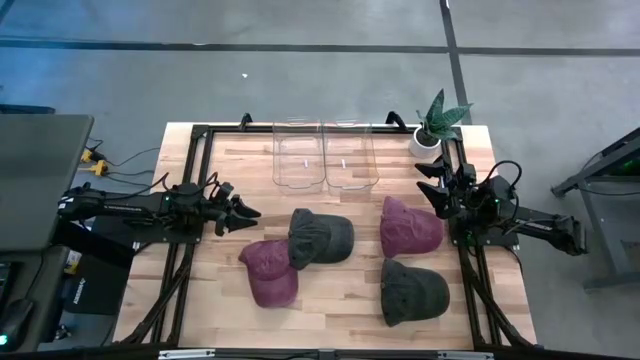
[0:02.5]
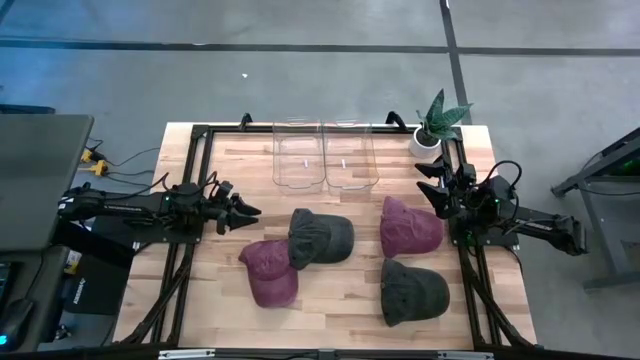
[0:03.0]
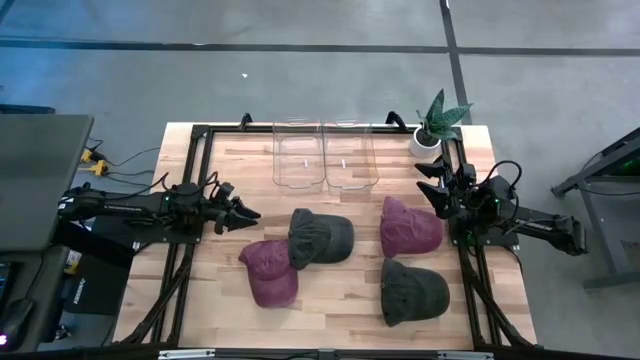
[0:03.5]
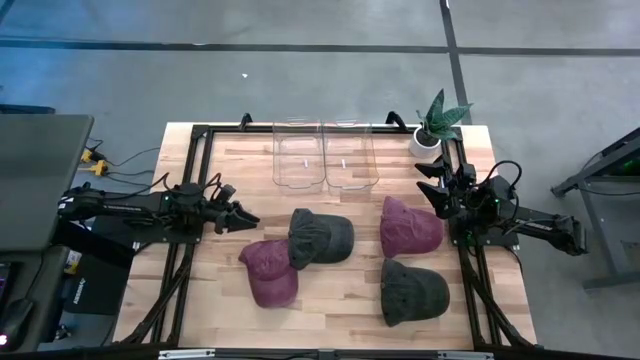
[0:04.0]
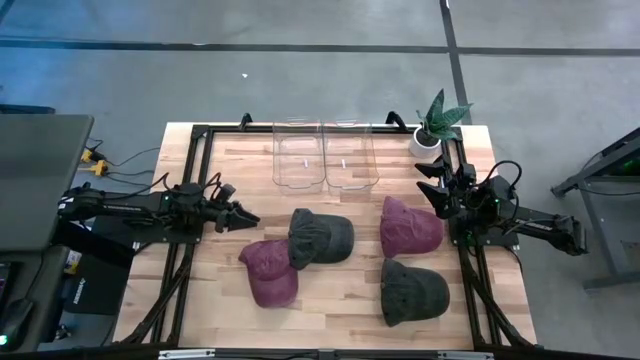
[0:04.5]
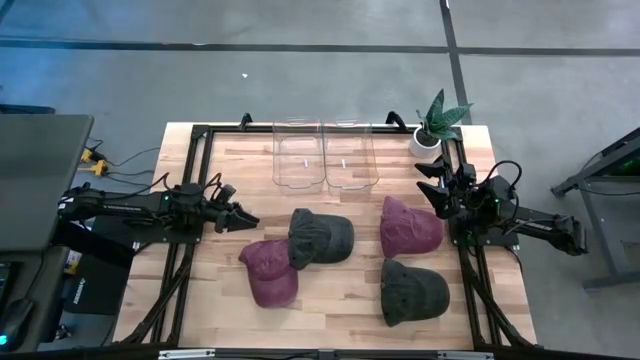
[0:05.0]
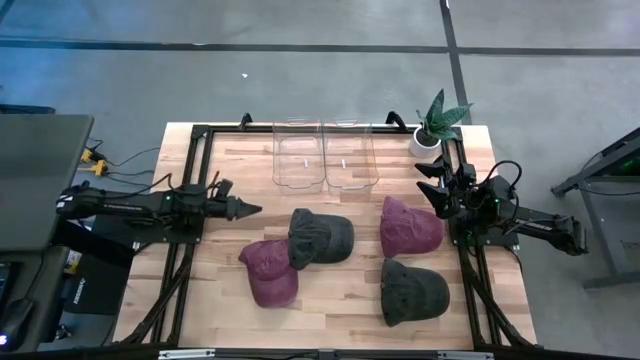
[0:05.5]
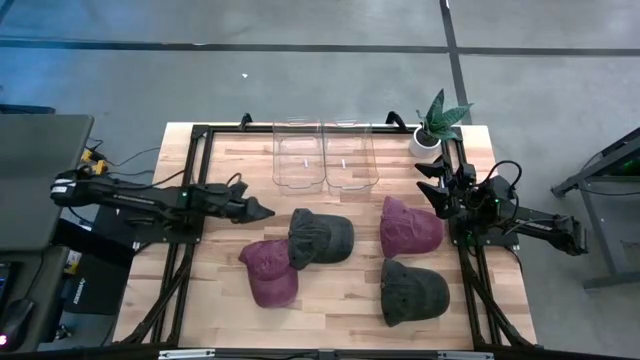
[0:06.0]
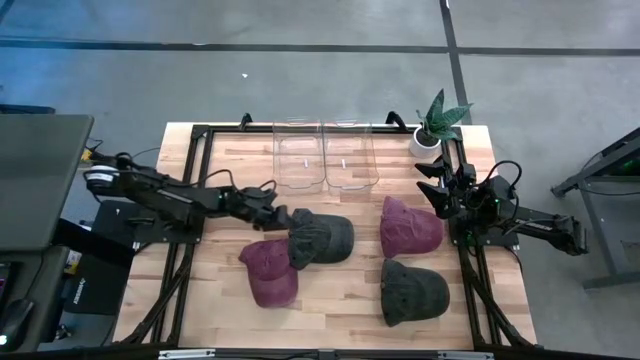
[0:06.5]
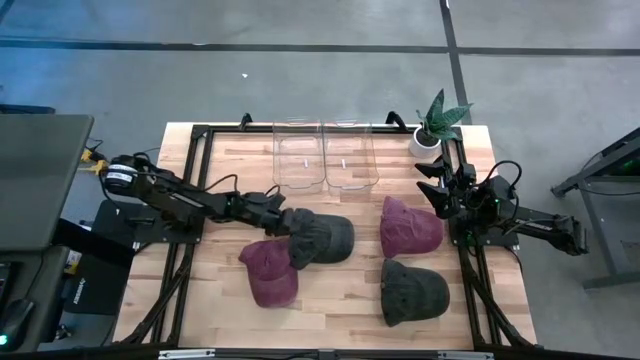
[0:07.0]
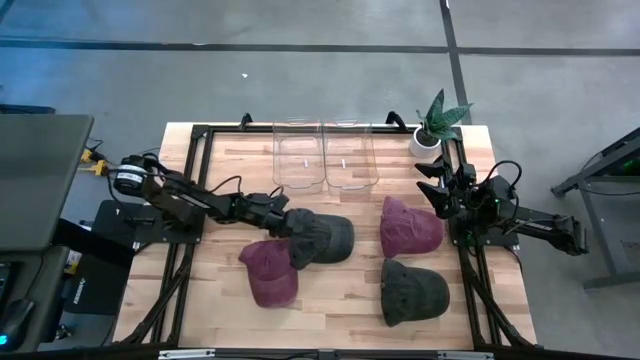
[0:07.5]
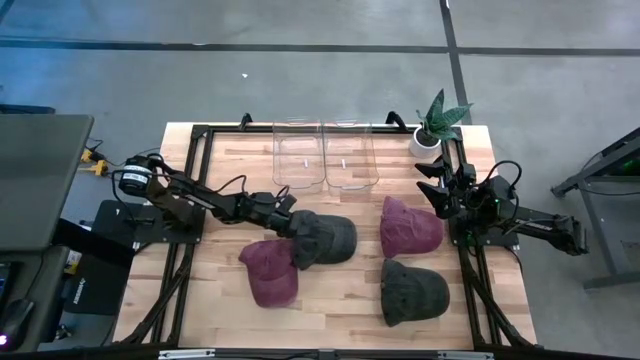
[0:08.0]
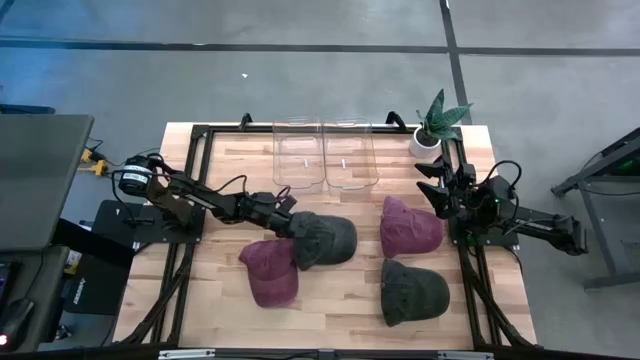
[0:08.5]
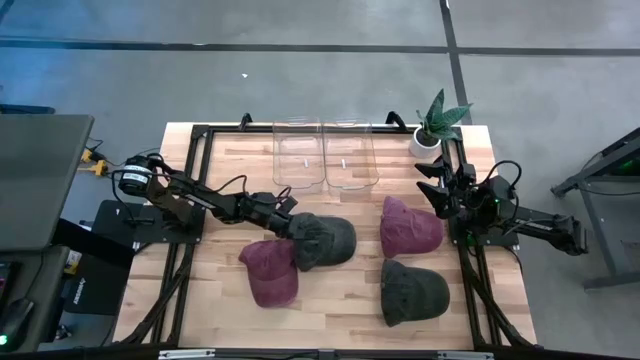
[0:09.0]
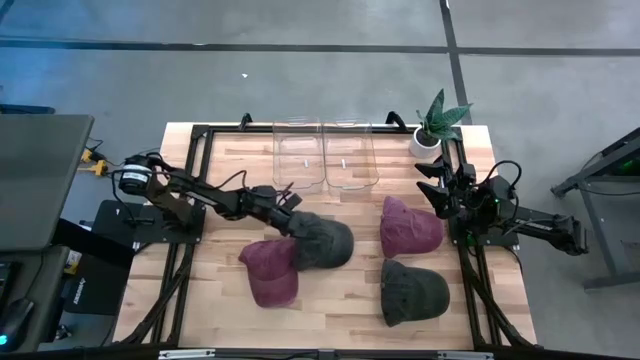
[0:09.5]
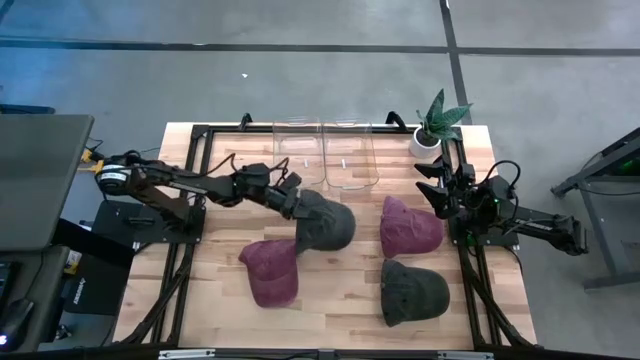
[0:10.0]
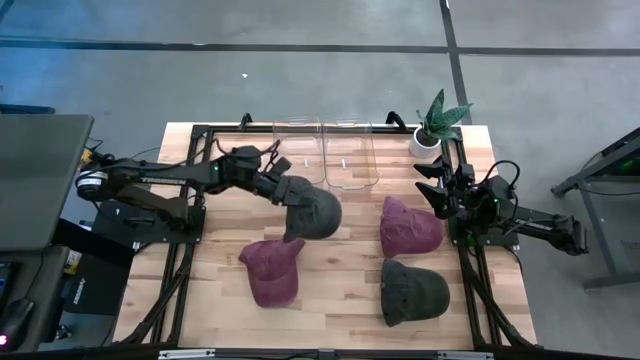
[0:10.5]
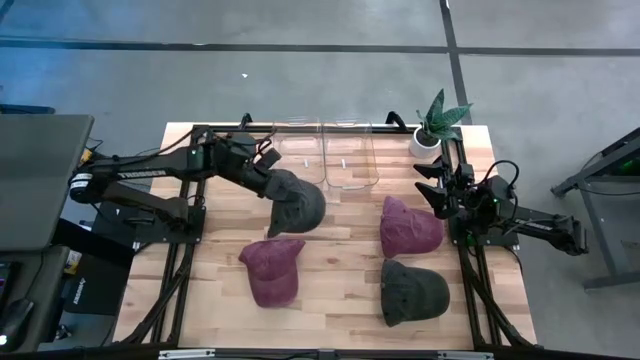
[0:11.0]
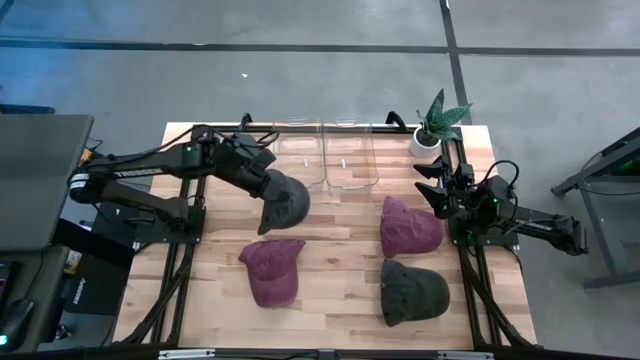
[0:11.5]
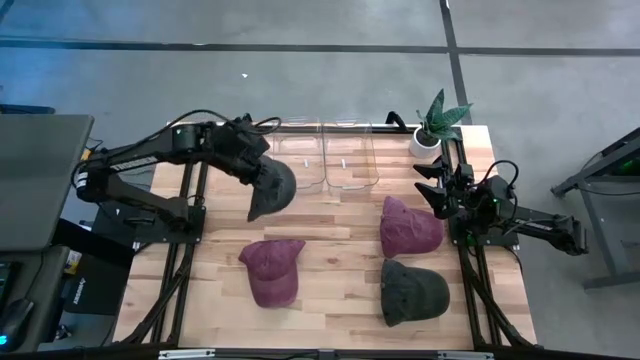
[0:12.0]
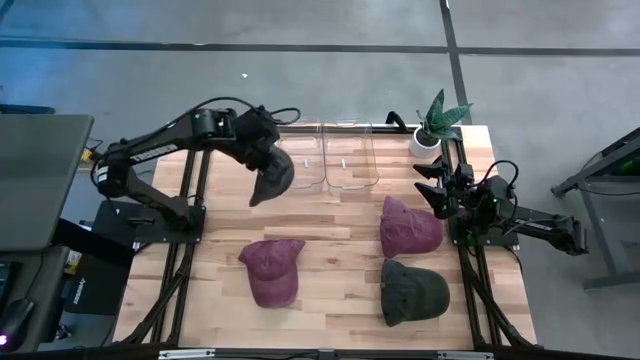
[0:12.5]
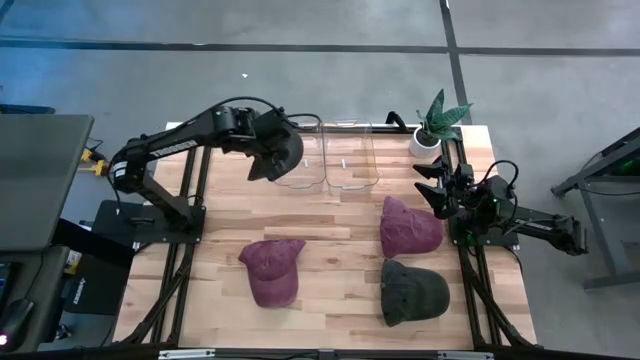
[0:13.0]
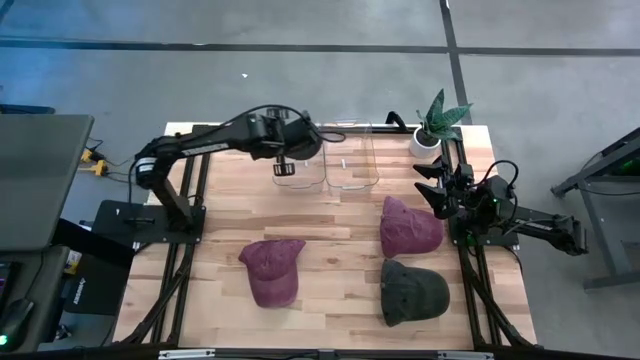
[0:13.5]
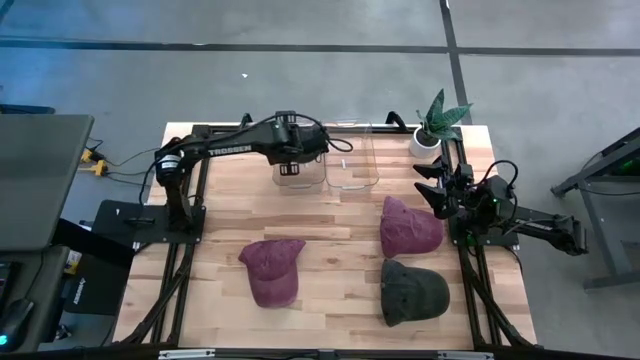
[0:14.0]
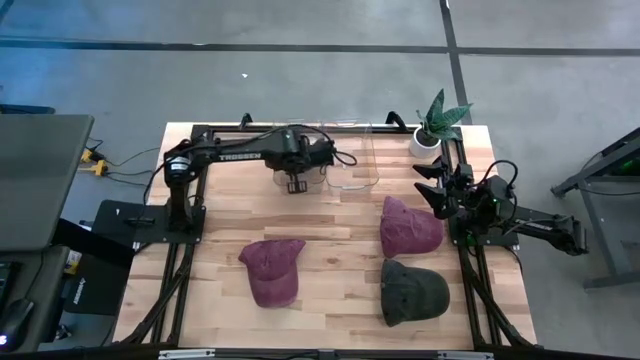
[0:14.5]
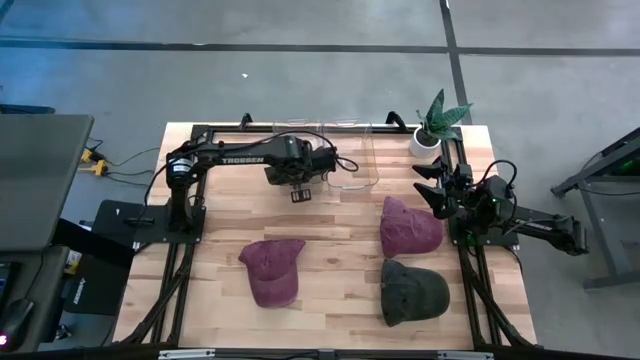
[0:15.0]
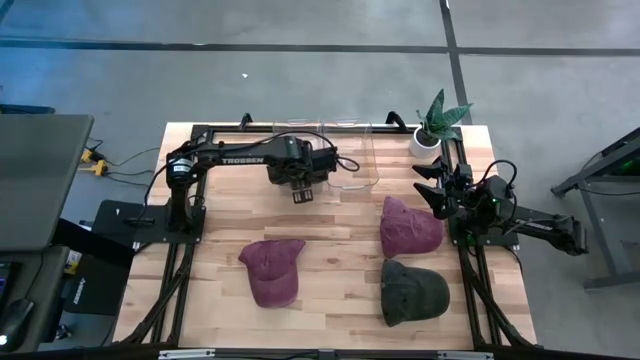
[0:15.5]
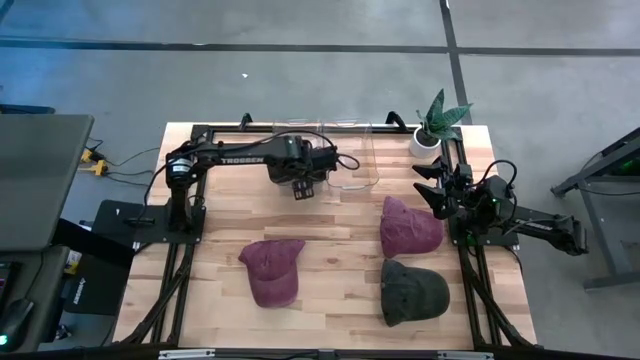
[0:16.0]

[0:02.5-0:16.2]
Task: Pick & Place hat
Put the left black cap into the left transparent bin

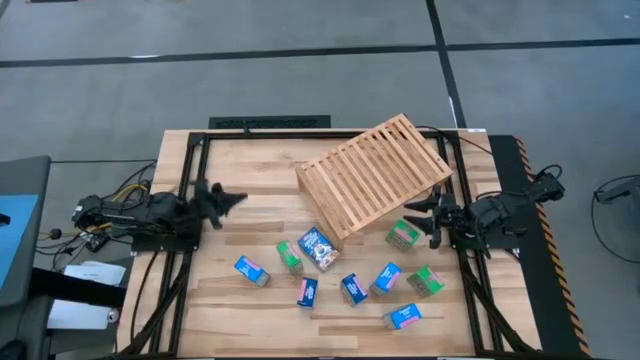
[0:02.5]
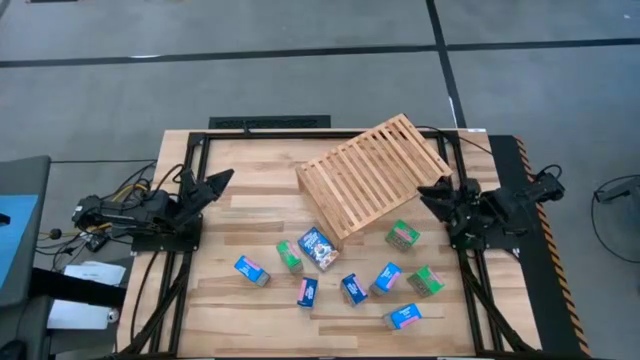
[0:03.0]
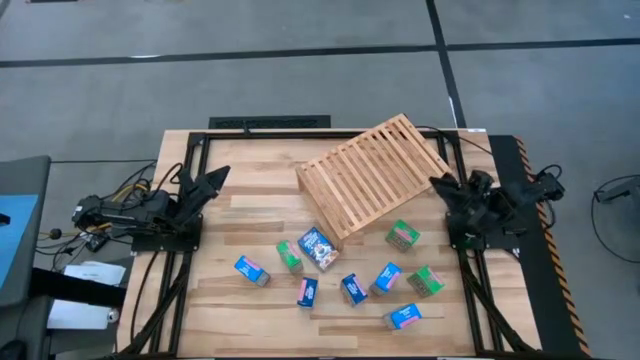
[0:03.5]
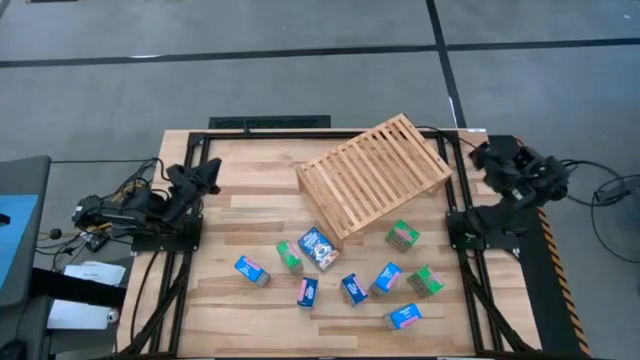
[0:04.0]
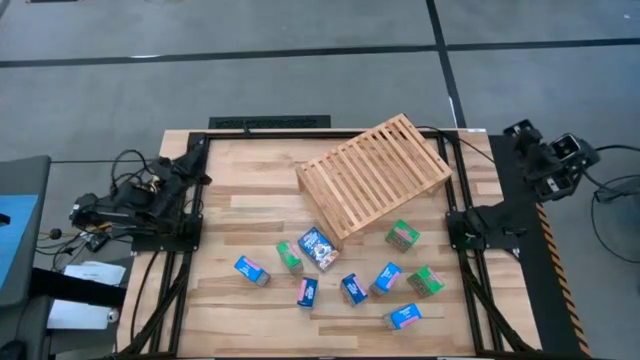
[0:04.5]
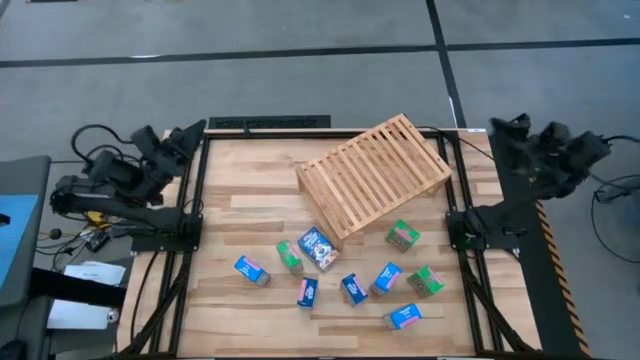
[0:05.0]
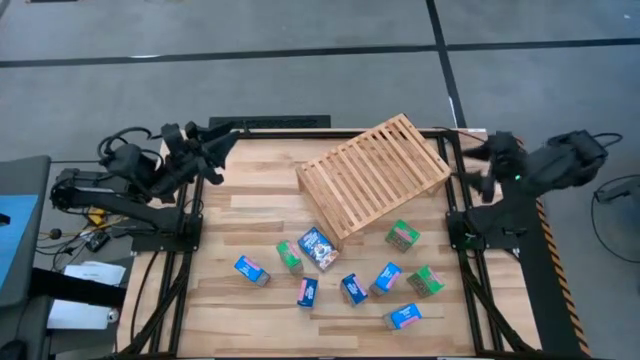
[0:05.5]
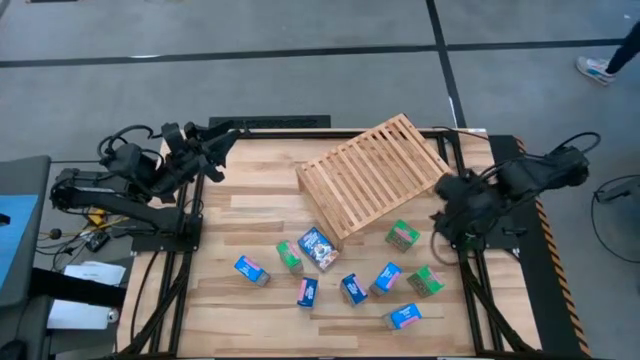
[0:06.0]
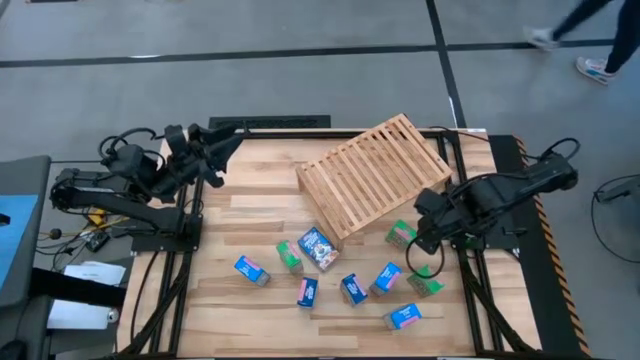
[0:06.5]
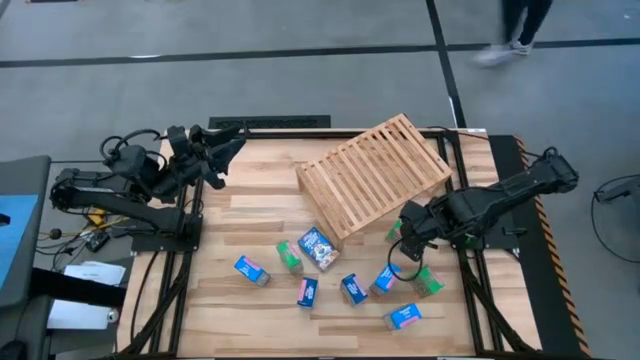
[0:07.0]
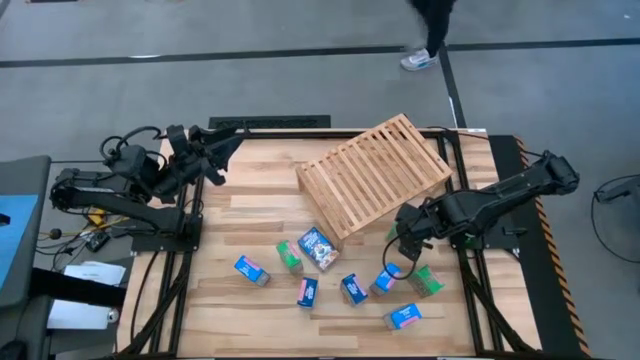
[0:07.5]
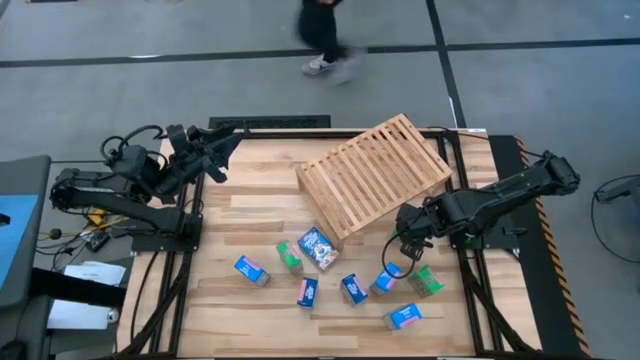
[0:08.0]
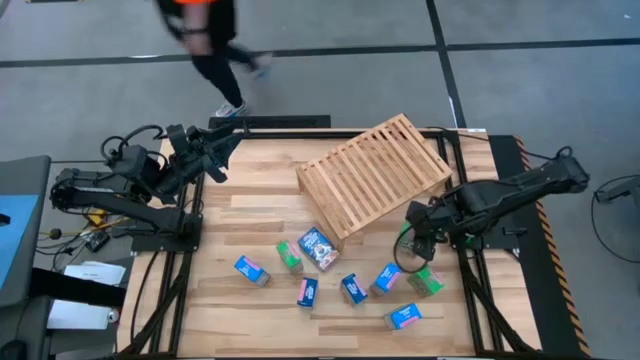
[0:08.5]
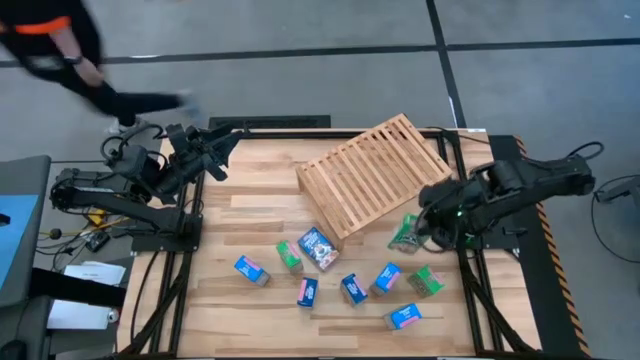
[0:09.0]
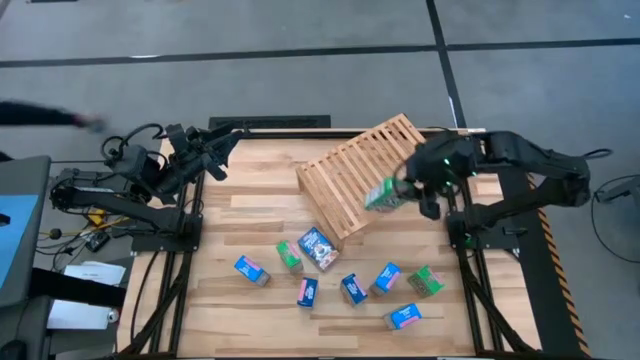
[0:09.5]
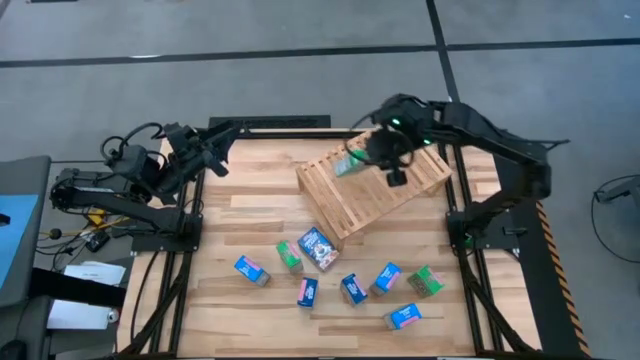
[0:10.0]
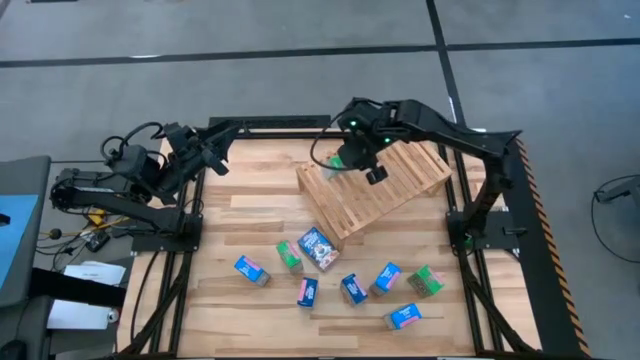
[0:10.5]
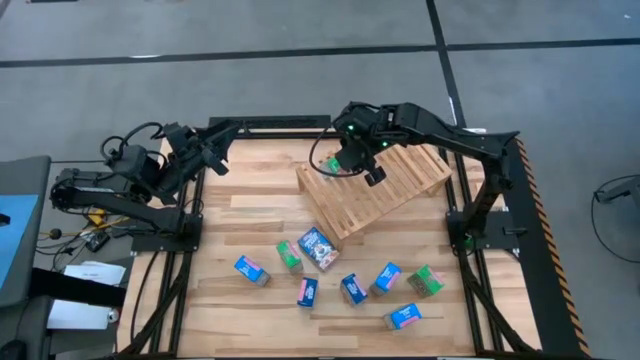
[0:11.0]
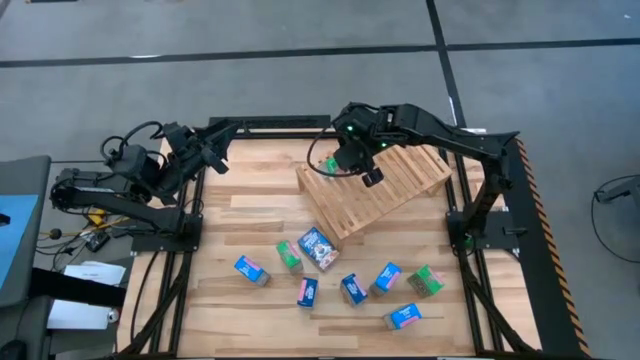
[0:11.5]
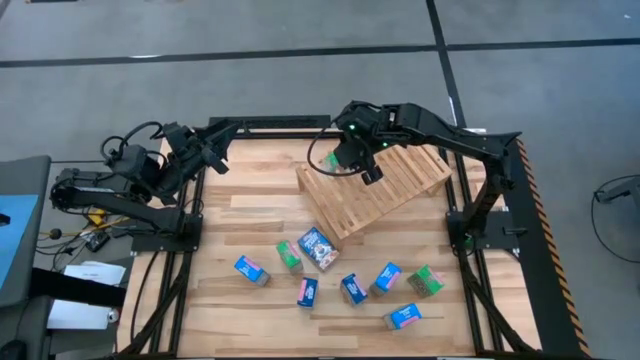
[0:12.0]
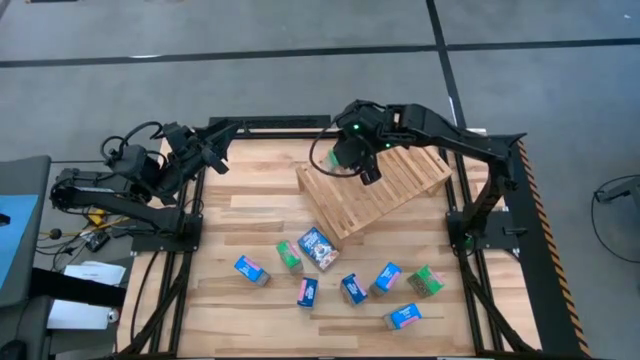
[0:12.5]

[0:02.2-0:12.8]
Task: Stack cereal on shelf
Put the right green cereal on the shelf
